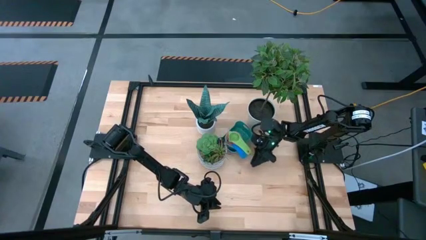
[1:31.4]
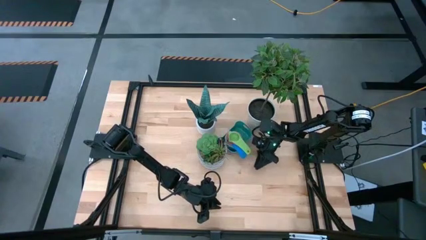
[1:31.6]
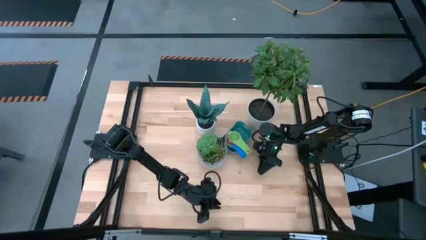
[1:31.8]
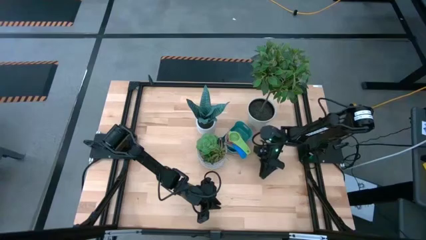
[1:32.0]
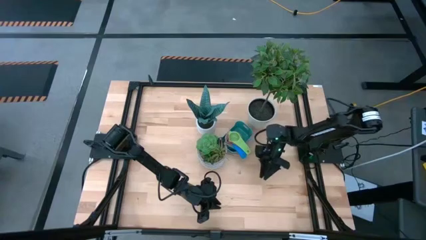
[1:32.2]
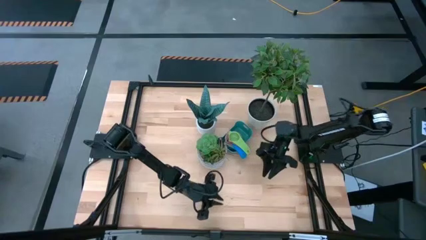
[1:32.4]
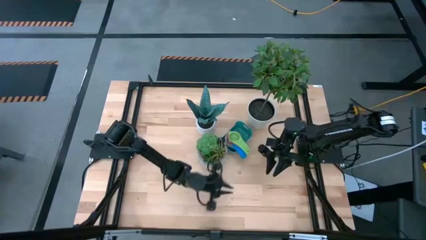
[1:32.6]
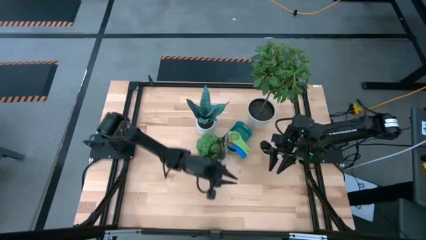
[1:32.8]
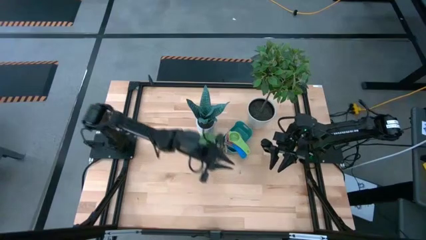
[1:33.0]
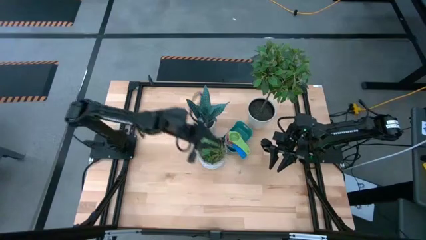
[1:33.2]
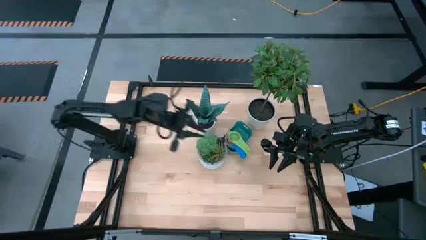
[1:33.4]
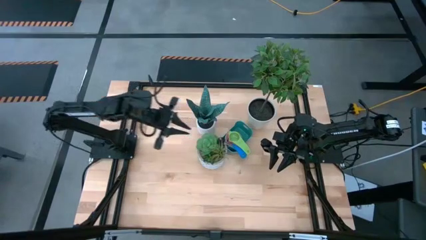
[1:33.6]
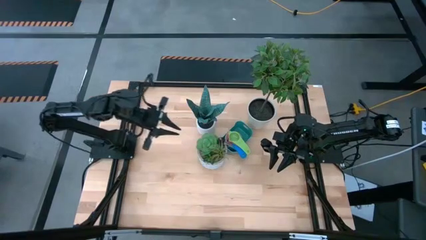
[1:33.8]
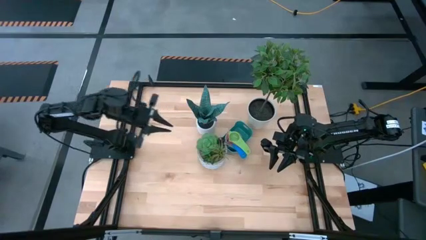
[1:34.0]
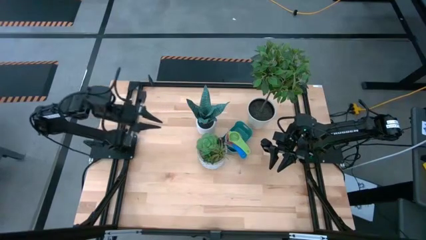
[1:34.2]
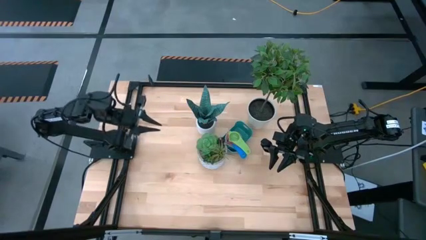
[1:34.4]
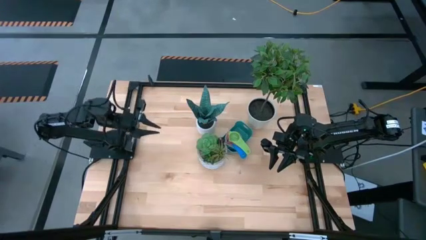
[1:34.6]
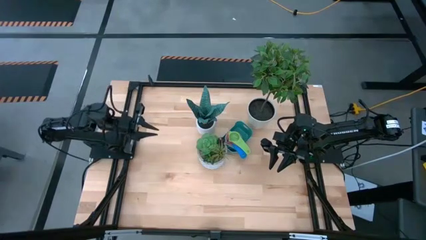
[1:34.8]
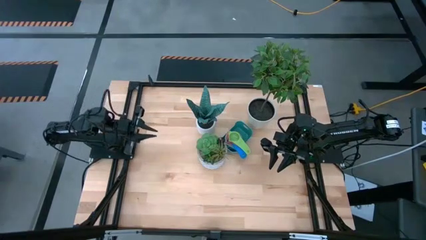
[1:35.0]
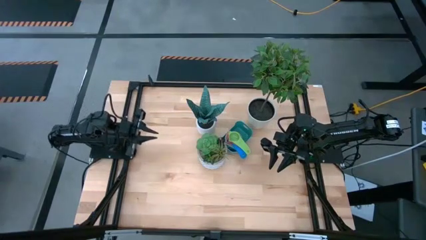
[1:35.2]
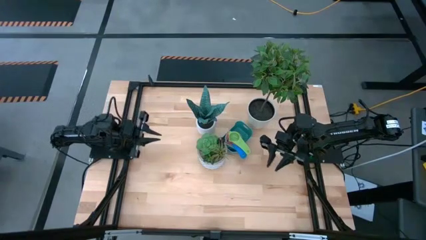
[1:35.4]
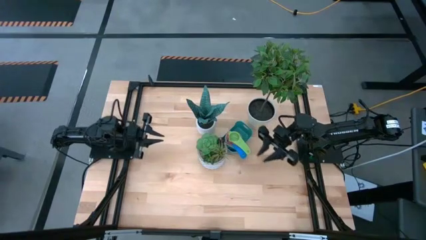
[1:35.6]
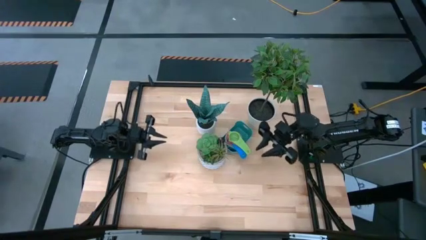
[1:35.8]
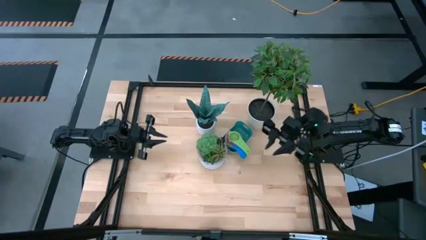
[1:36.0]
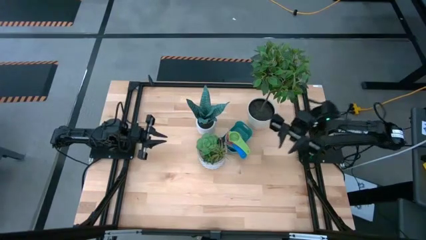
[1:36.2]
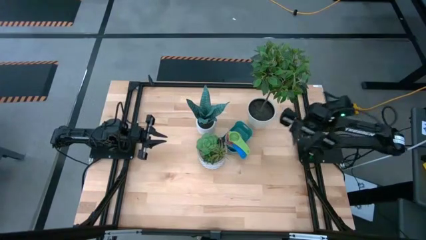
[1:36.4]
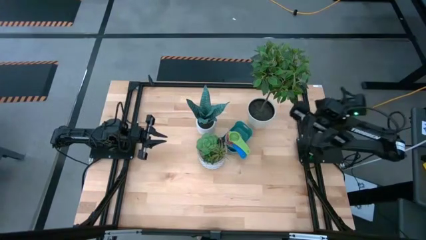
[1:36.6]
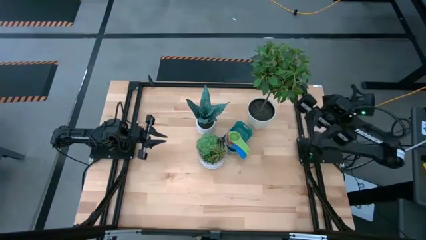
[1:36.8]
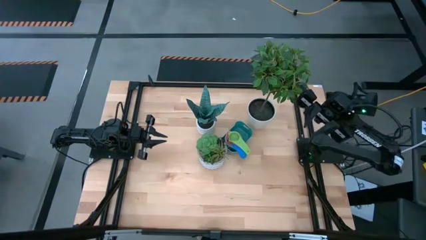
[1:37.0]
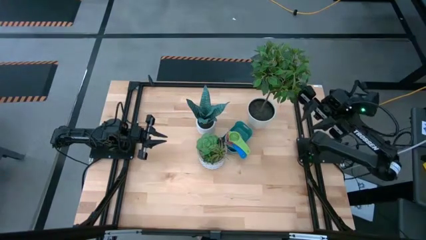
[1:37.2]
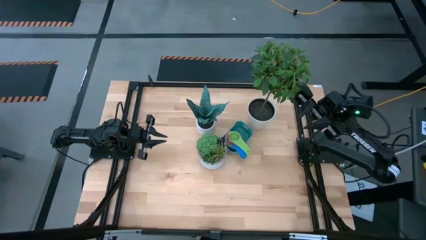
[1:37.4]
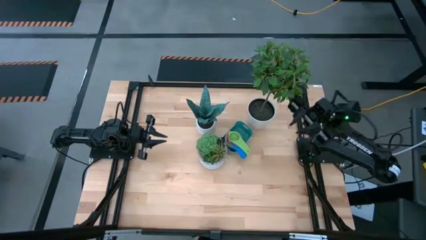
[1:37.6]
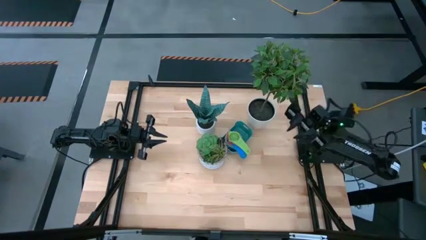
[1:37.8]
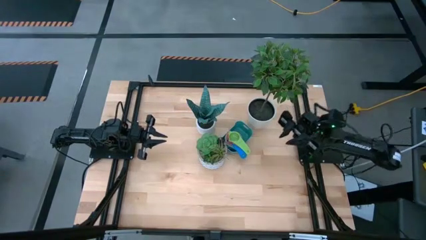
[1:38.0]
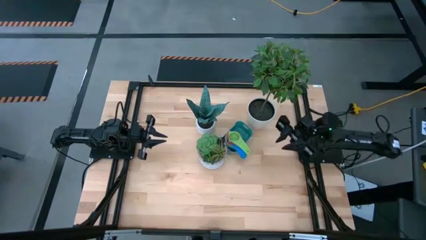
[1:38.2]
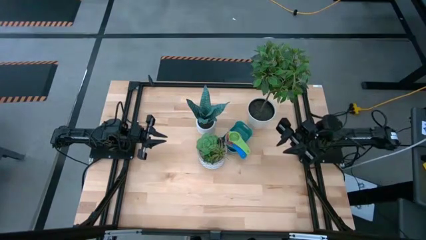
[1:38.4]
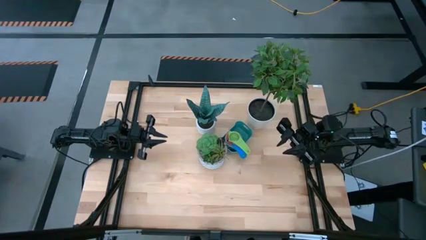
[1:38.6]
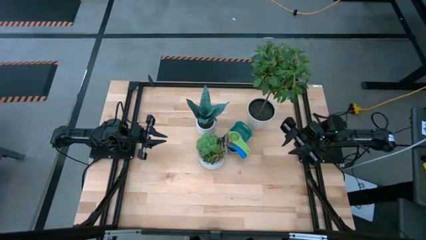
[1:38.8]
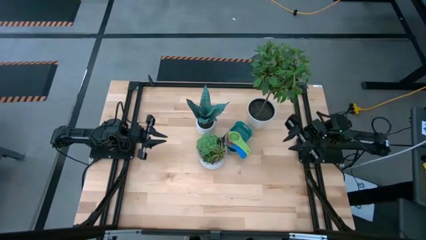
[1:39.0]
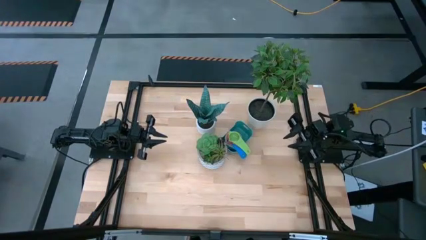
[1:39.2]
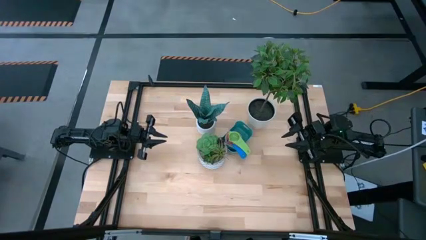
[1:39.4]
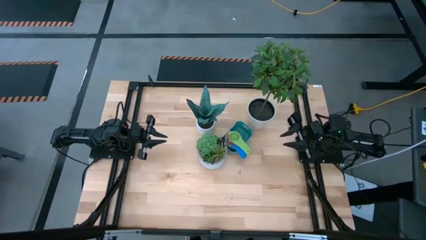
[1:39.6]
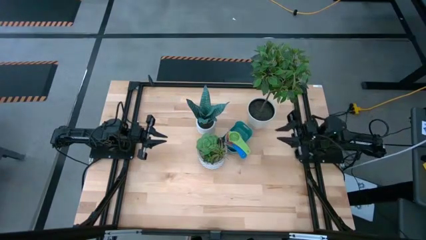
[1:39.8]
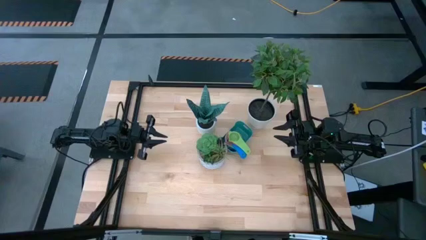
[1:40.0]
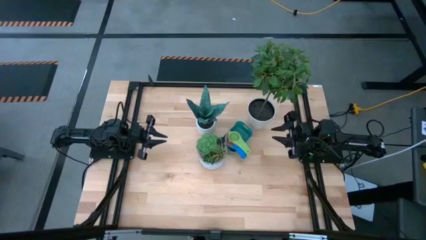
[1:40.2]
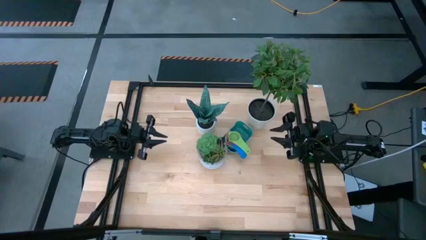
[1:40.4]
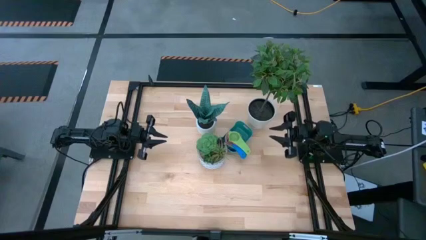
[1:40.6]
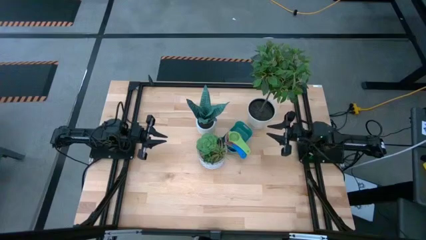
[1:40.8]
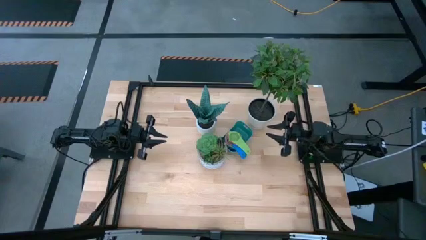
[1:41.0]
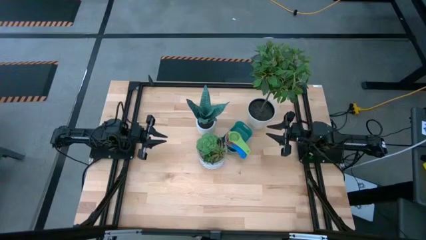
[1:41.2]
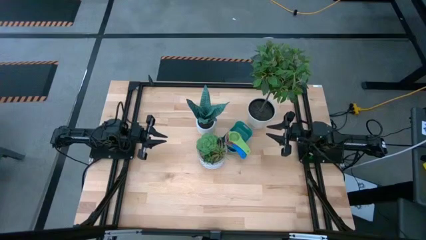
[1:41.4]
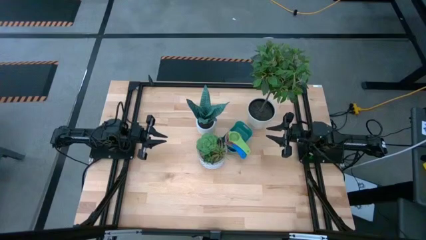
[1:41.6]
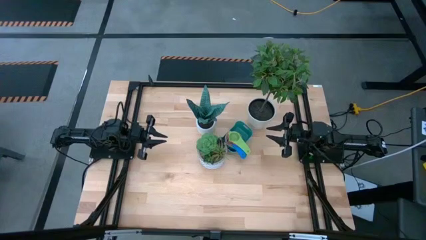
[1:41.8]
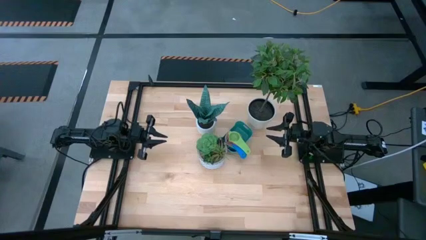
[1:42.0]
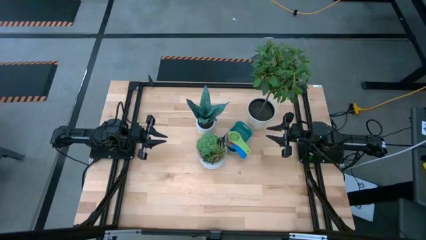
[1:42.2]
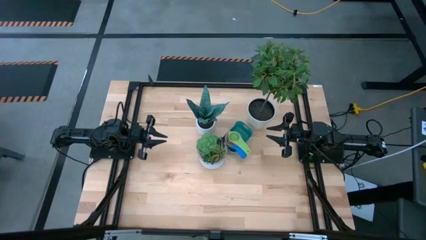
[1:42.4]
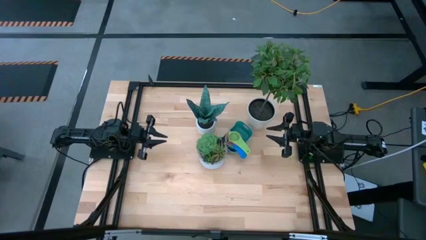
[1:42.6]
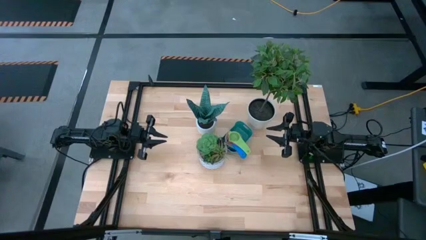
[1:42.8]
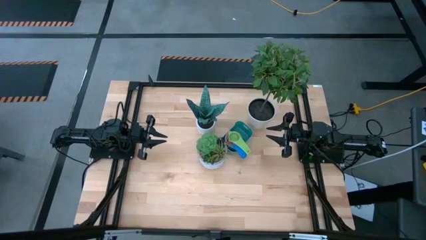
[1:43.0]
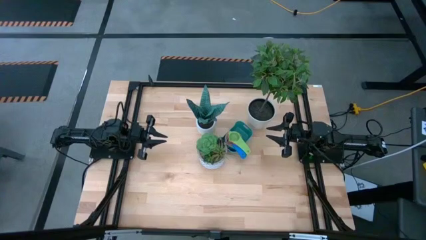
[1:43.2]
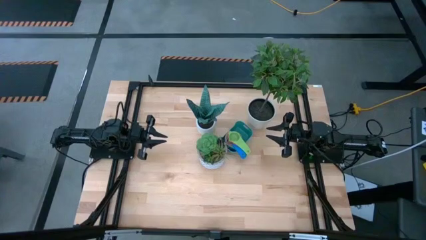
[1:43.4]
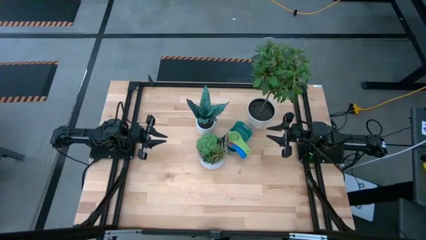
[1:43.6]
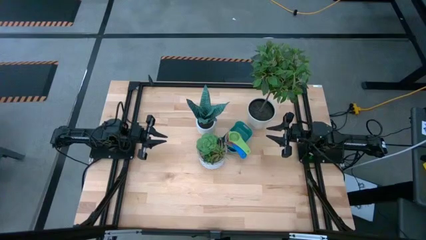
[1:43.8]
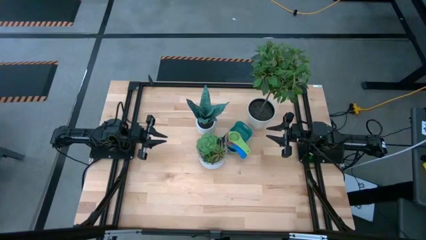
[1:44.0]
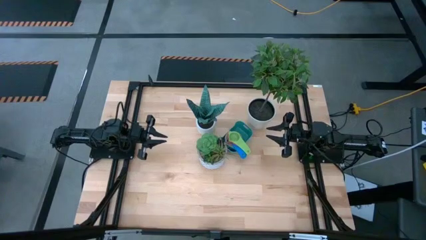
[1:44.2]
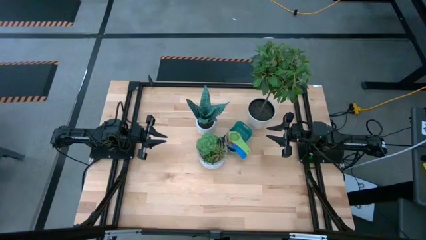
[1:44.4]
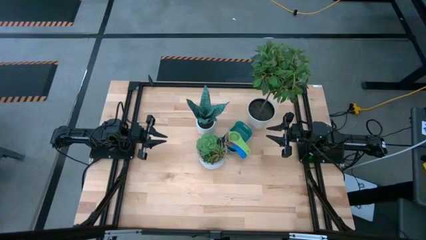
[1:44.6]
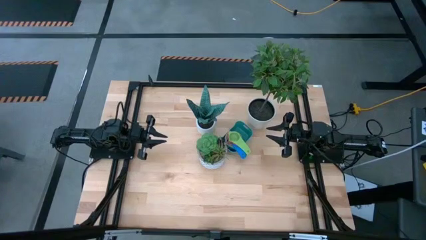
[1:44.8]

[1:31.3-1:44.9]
Task: Nest measuring cups in basket
Return to Home Position

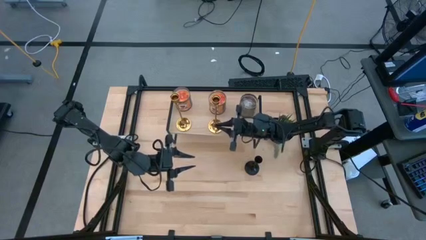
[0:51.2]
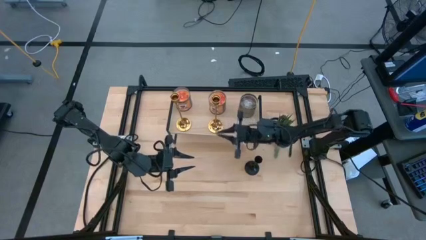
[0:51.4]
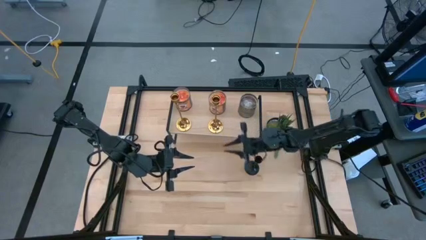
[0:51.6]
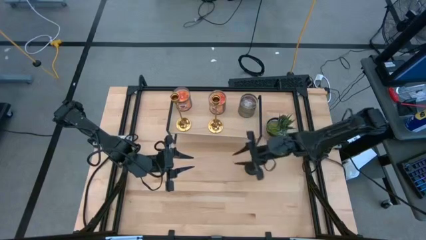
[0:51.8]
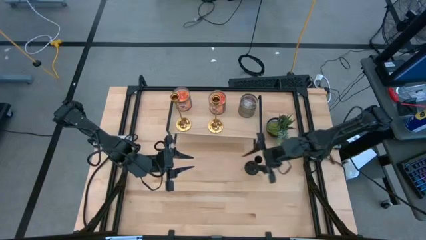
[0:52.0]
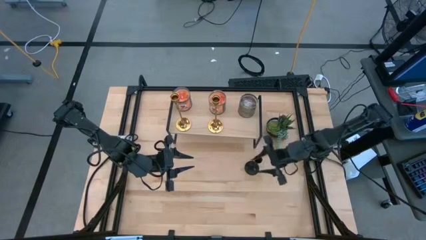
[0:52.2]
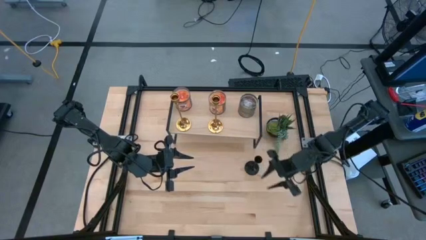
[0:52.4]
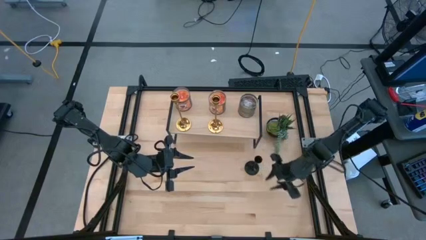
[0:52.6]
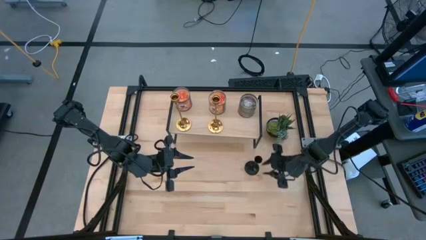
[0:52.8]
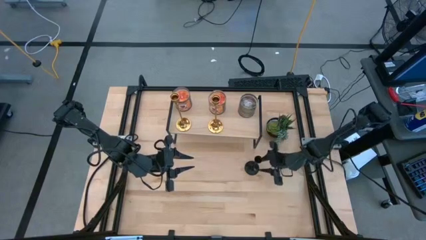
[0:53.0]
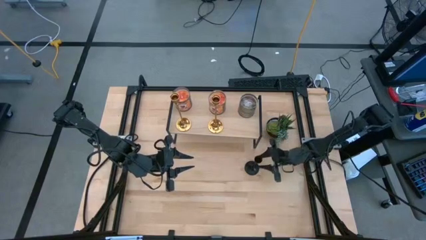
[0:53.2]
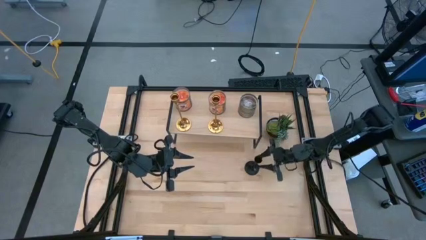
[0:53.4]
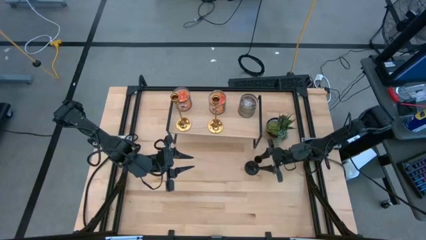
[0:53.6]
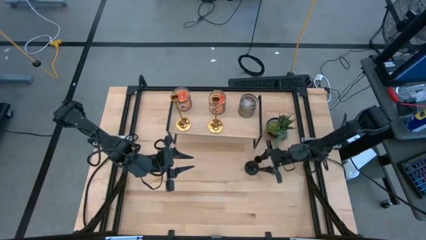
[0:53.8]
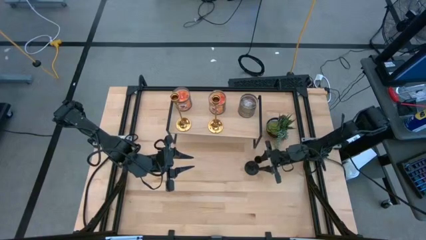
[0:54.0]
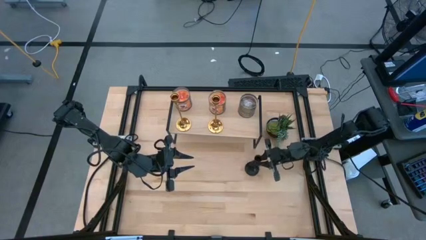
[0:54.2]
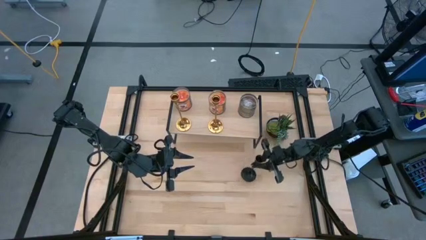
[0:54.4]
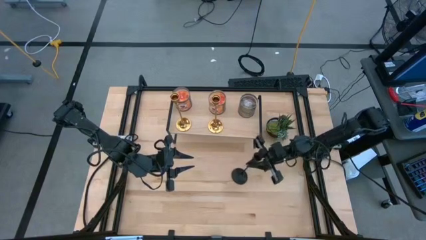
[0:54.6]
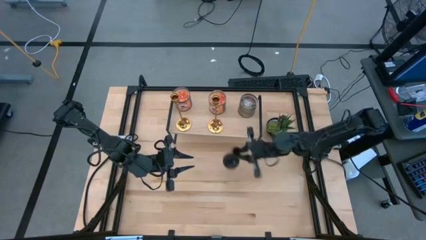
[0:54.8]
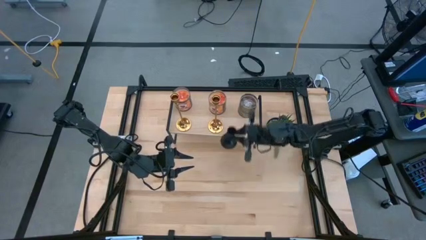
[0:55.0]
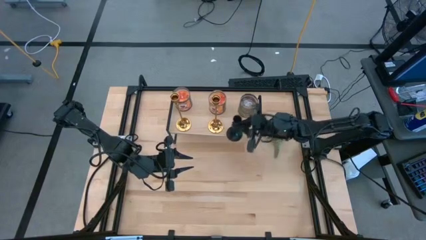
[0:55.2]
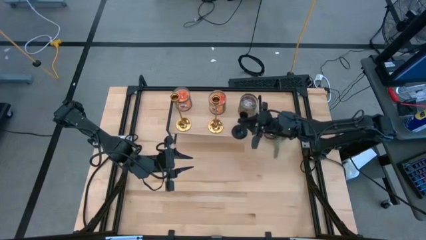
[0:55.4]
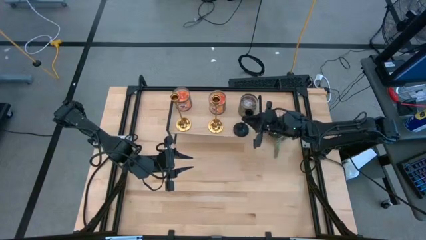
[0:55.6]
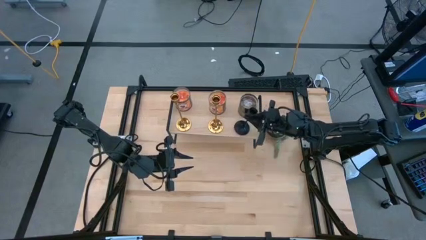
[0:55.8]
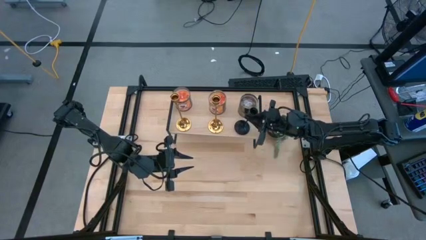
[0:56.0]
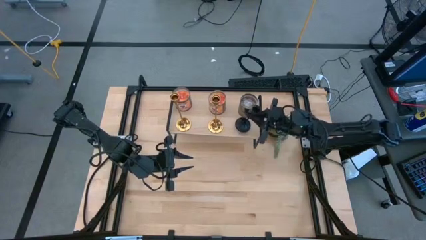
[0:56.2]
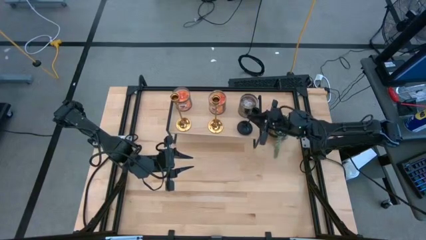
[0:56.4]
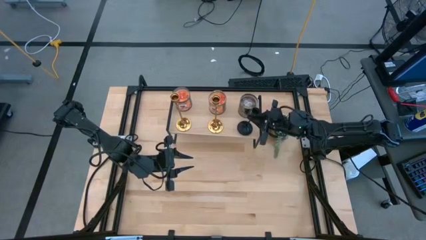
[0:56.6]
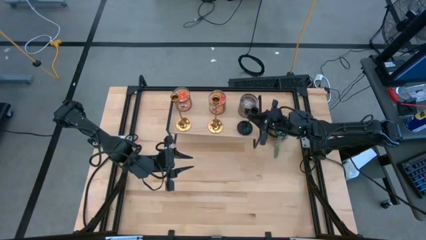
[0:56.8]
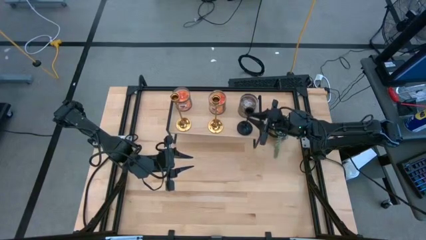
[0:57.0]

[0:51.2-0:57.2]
Task: Pick & Place candle stick holders
Put the black candle holder on the shelf
